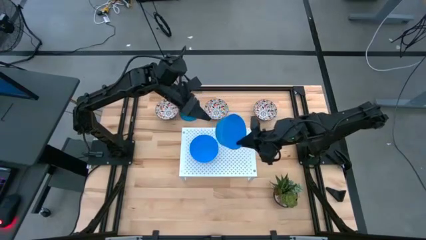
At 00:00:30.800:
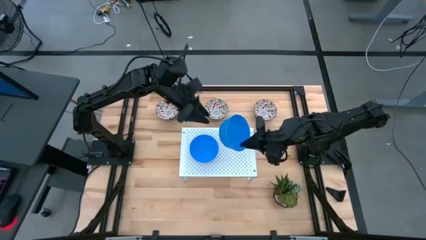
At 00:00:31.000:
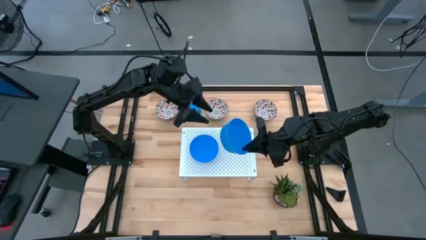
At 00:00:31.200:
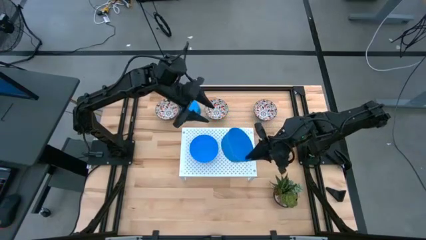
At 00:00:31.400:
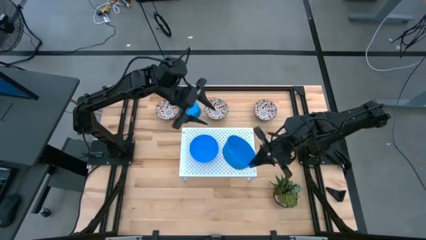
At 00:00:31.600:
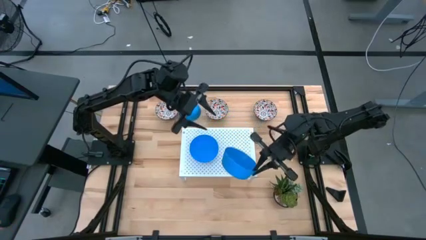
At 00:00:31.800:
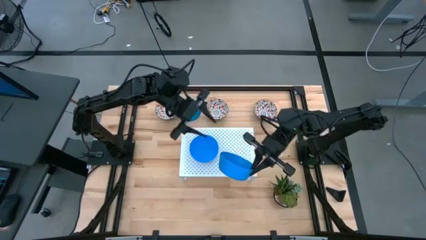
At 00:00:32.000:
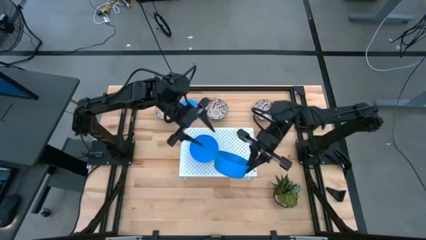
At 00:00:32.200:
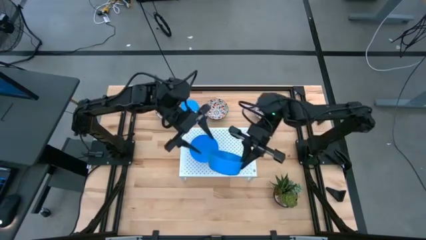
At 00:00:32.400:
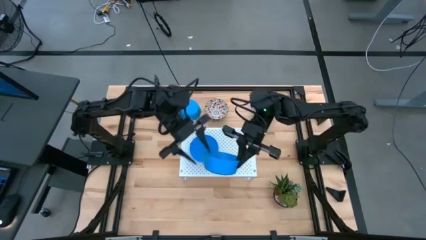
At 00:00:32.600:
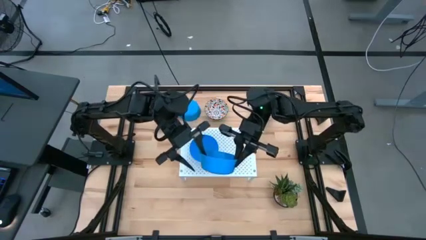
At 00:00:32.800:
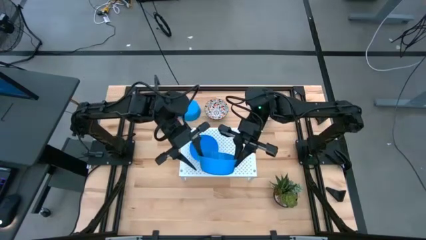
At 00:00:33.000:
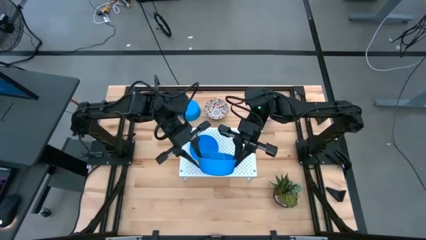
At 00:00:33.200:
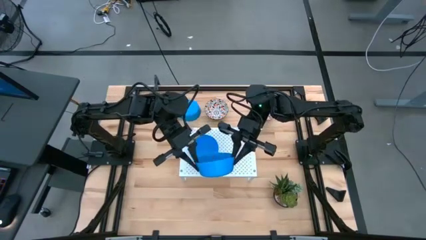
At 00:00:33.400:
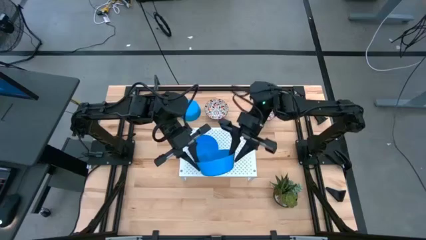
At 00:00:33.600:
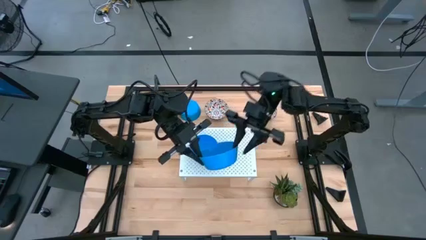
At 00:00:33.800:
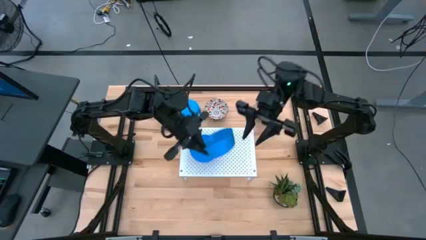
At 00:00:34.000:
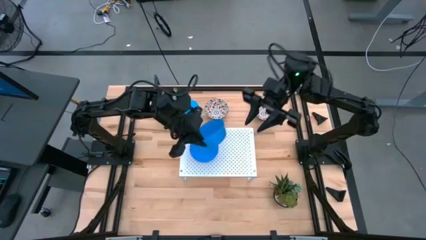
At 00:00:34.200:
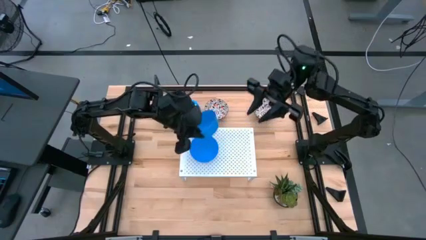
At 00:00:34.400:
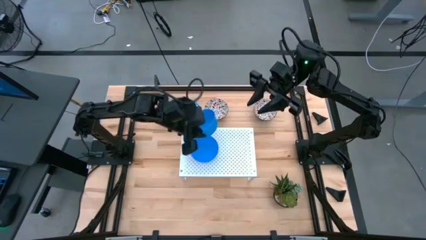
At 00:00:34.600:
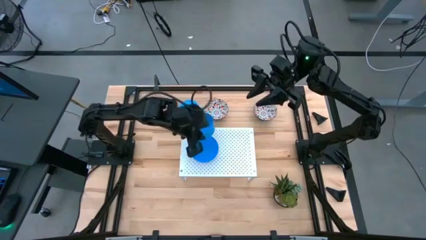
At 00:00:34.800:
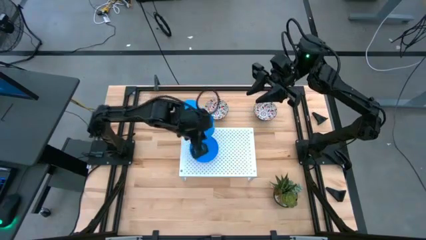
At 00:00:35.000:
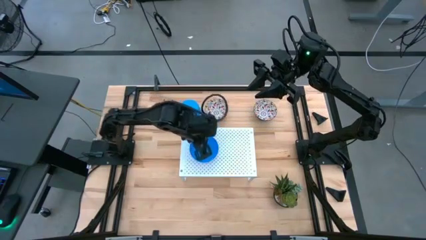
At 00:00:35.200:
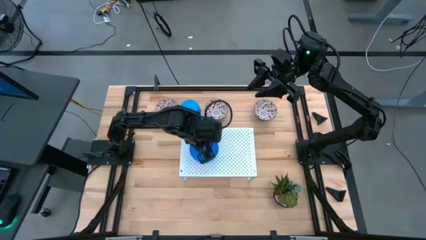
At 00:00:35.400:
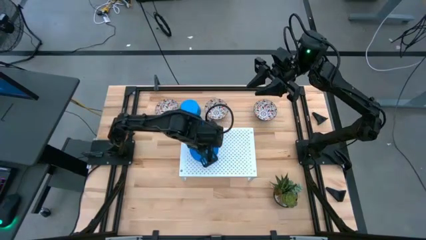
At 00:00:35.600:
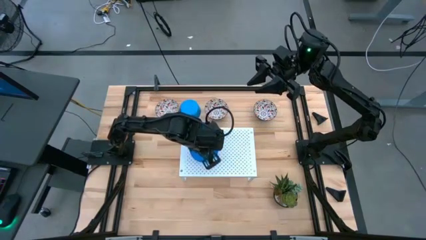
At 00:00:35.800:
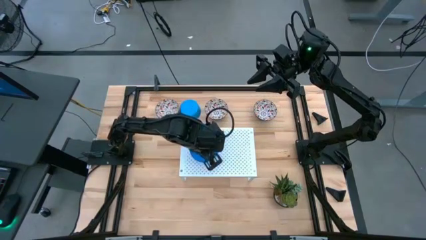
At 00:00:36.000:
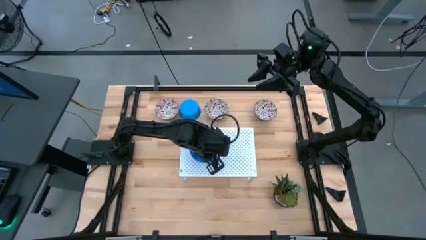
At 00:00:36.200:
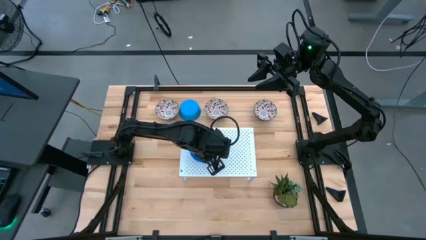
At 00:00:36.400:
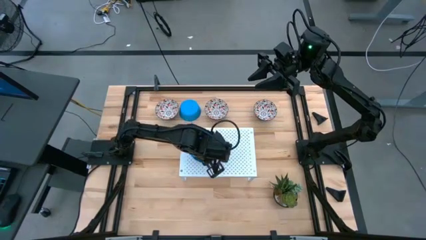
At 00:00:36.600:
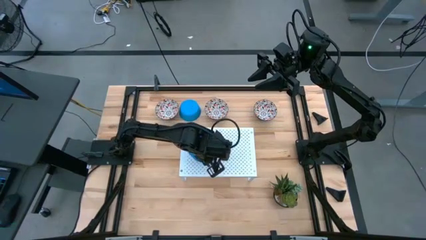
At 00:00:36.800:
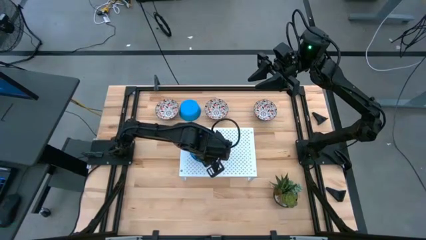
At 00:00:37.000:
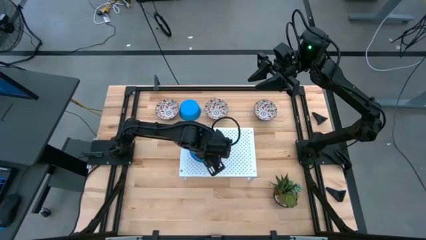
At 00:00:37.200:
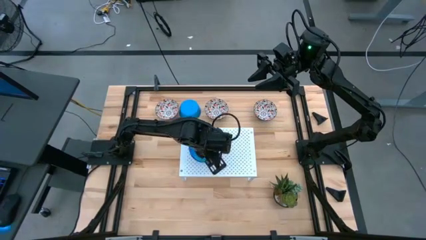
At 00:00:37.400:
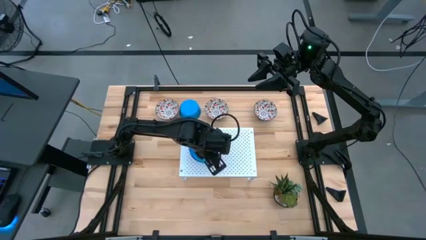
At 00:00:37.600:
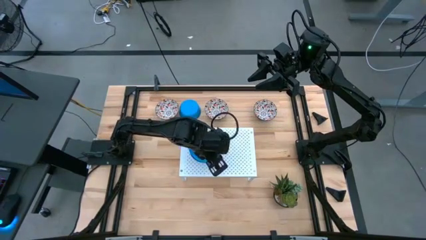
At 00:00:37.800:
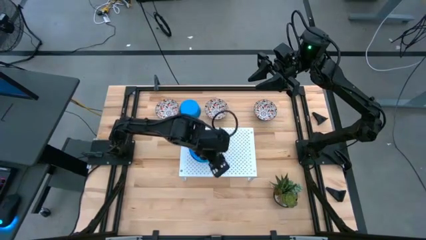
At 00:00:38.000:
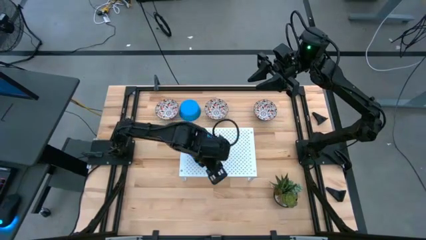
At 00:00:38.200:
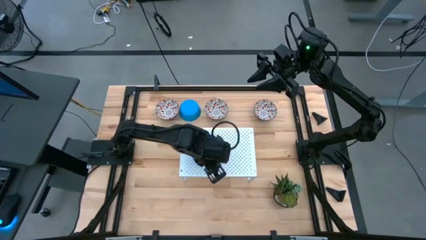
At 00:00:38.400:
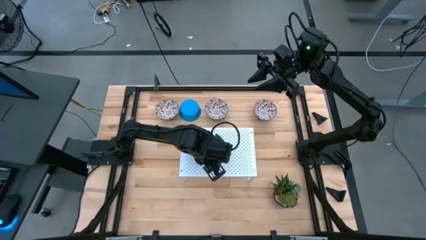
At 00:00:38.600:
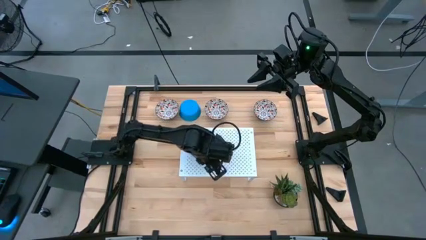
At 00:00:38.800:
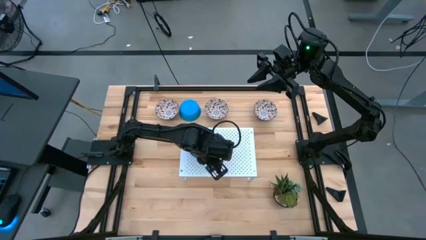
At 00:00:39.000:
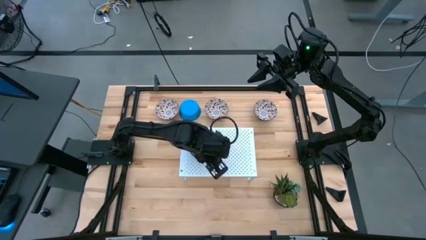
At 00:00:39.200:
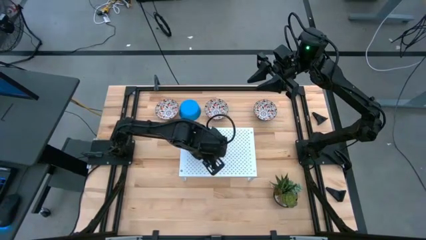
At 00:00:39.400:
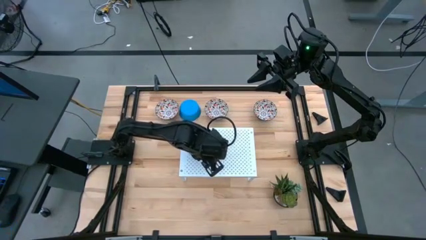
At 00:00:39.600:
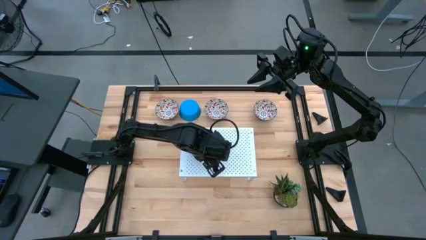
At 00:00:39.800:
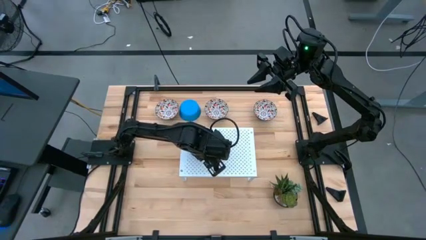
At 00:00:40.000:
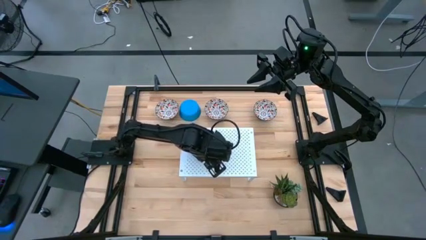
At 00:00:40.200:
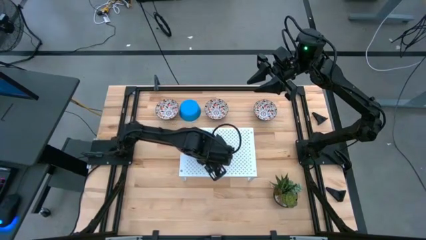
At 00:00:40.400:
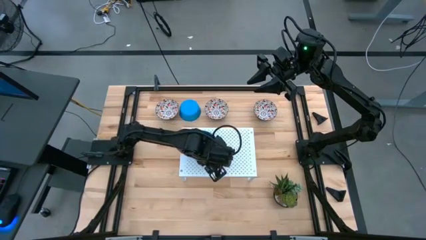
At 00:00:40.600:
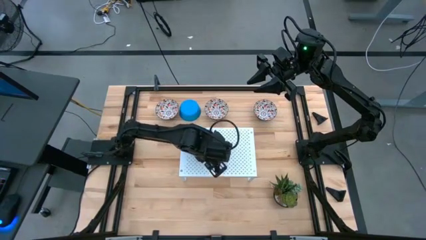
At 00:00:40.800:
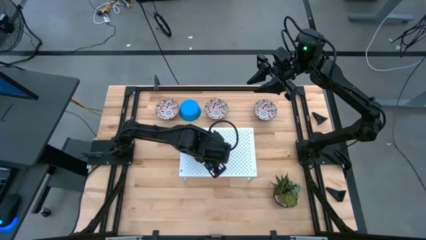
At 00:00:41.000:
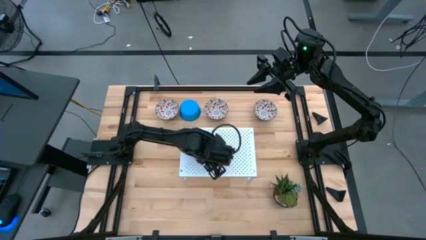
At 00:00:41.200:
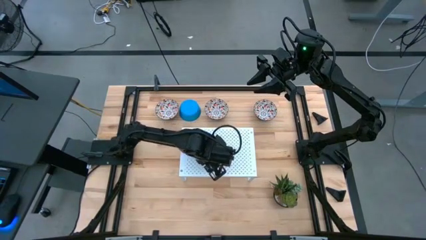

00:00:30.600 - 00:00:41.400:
Task: Pick & Place Mini bowls
Stack the left blue bowl on top of the blue bowl on the shelf
